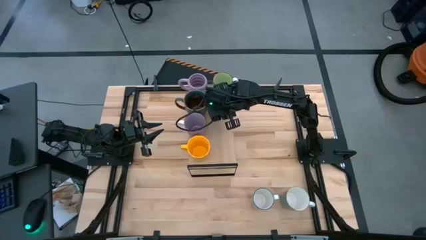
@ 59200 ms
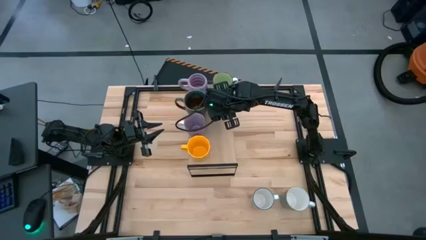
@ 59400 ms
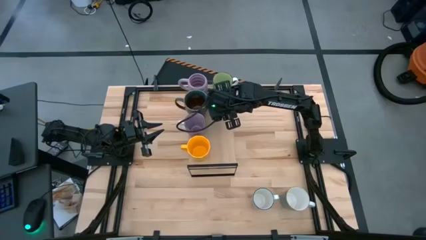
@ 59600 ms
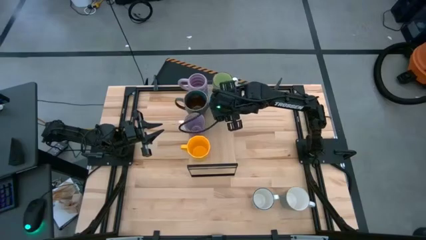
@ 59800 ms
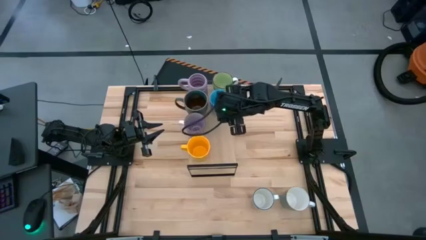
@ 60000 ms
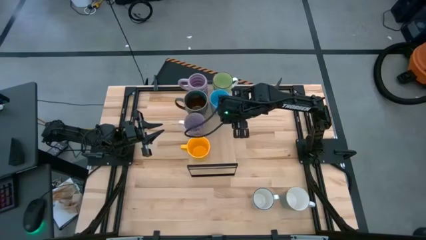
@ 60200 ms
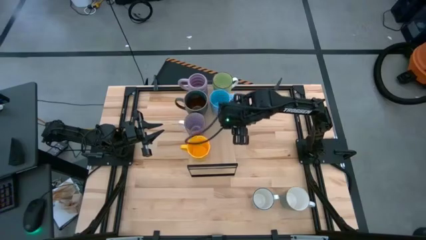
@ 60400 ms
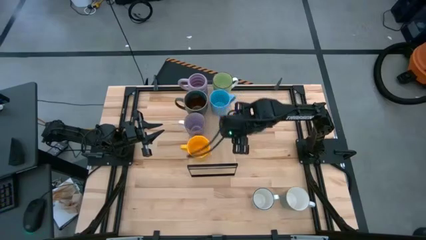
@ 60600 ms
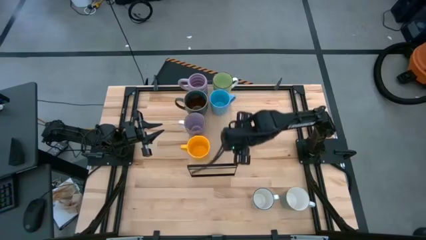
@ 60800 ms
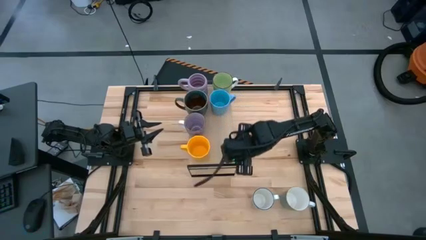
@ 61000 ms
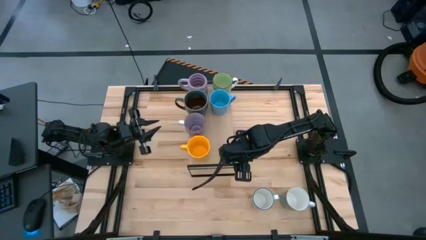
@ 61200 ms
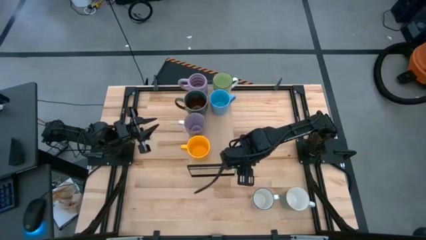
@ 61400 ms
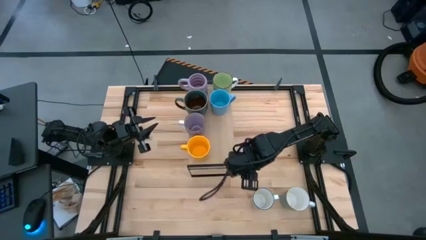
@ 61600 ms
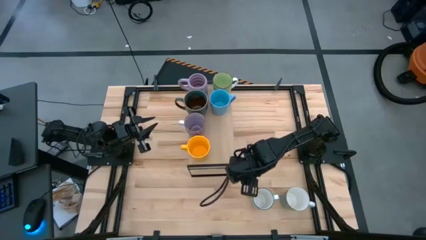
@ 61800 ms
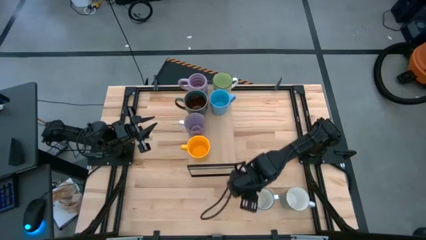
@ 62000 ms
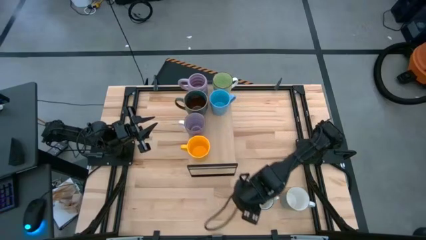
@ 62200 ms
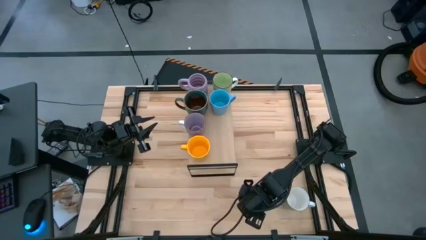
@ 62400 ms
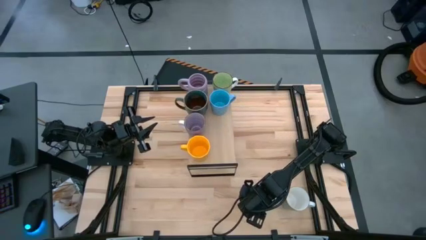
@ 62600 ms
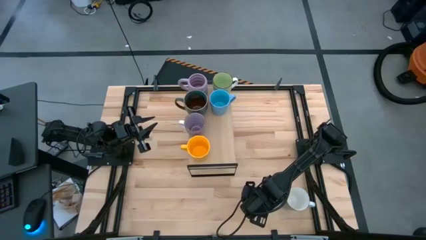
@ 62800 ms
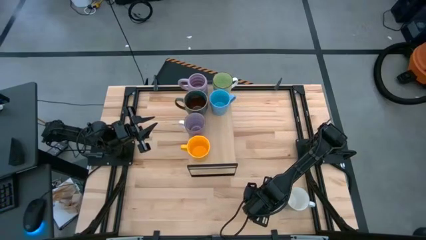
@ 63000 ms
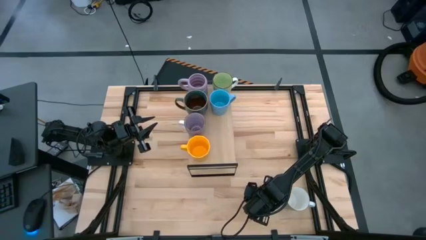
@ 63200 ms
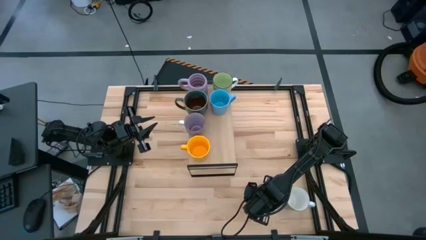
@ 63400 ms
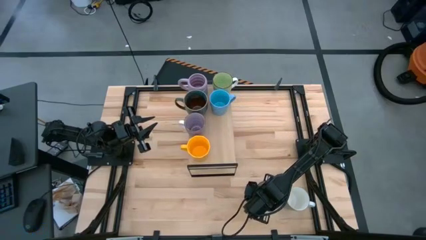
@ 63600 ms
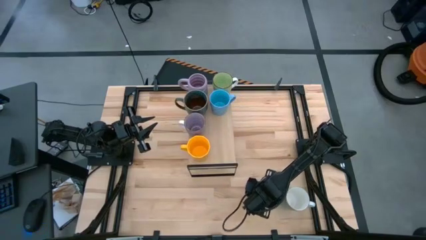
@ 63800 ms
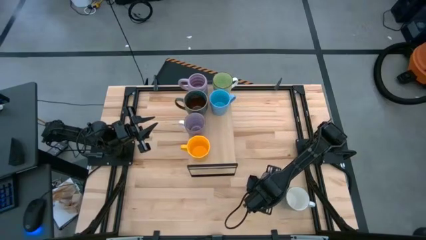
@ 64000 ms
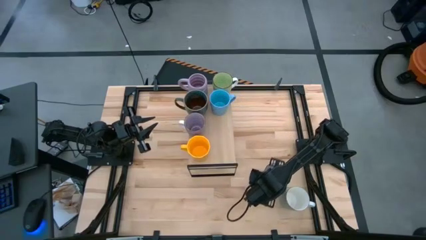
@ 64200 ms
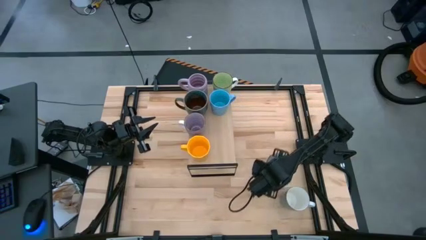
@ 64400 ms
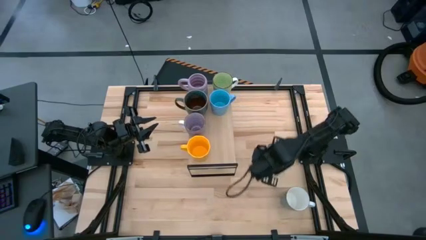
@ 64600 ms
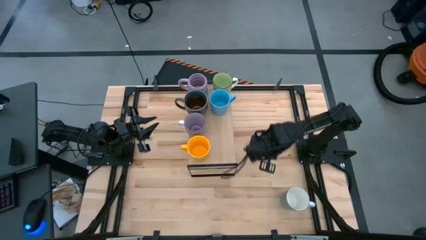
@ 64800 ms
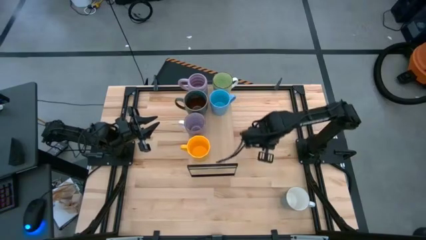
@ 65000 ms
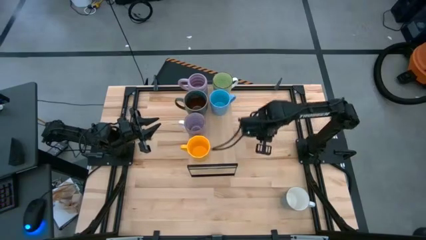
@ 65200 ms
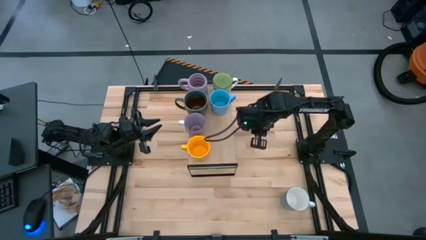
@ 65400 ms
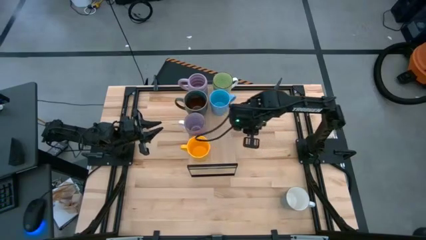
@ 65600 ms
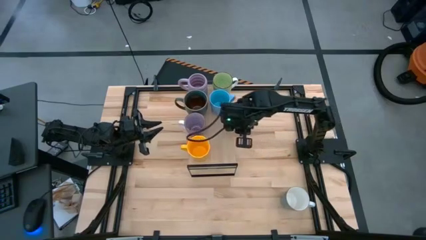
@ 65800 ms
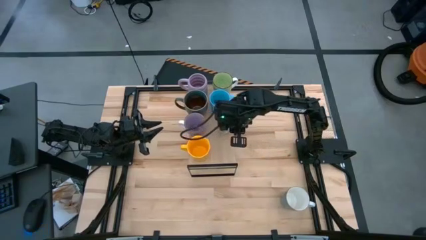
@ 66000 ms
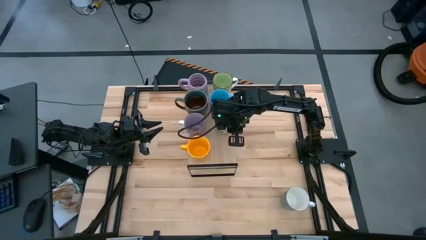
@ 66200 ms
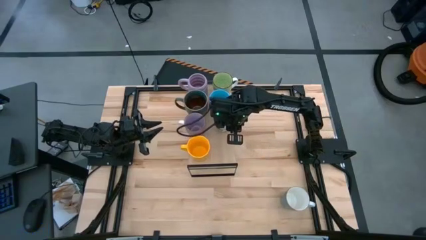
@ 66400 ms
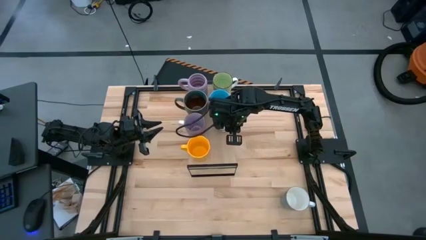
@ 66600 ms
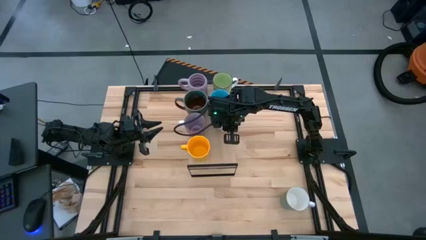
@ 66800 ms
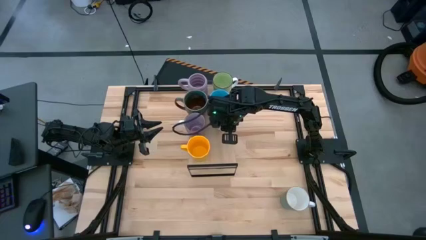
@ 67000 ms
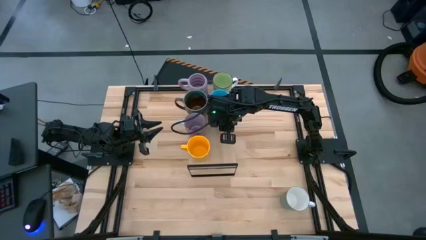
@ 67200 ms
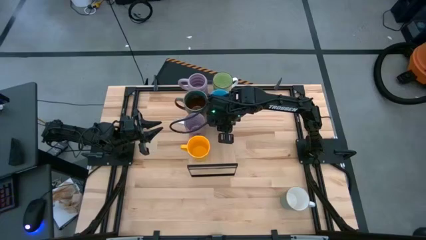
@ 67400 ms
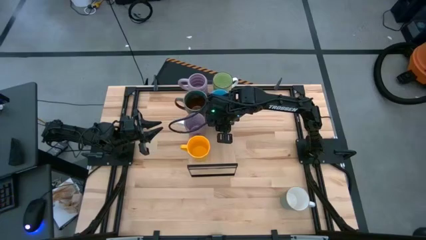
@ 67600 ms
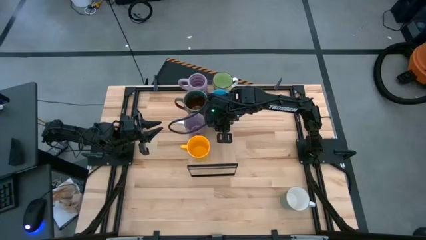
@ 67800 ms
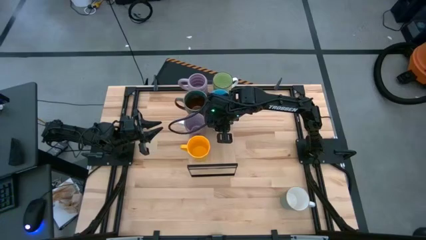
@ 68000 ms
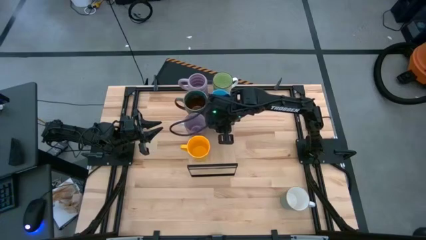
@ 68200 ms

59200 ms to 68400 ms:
Task: Place coffee mugs
Put the white patterned mug on the shelf

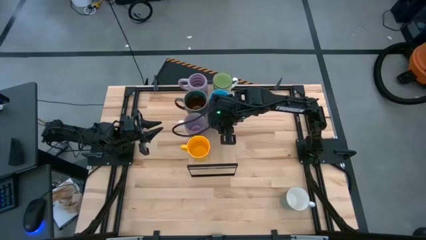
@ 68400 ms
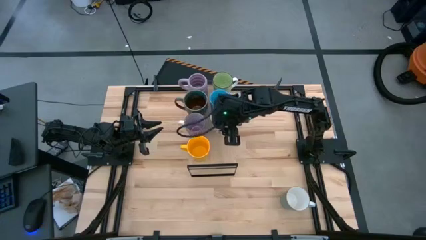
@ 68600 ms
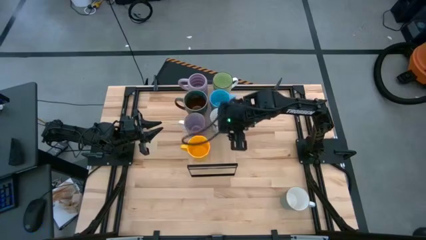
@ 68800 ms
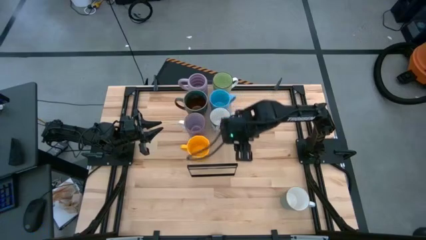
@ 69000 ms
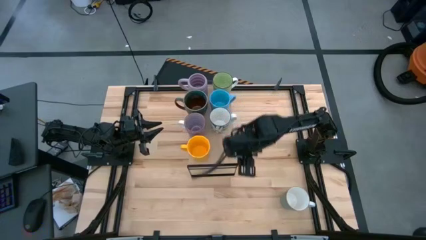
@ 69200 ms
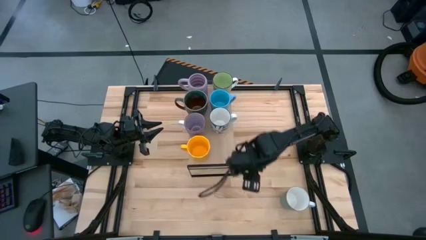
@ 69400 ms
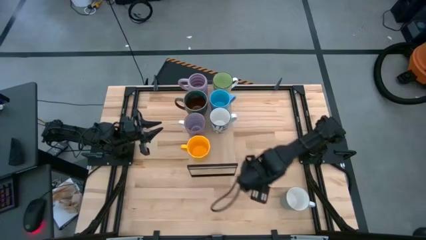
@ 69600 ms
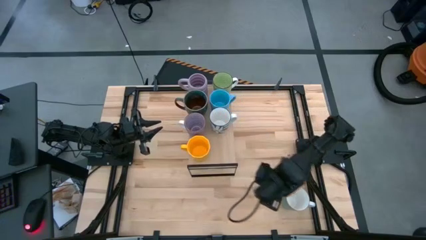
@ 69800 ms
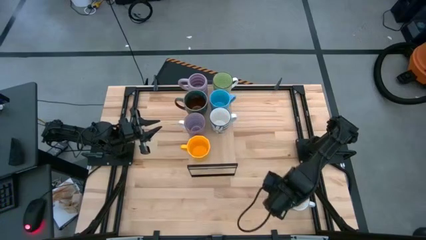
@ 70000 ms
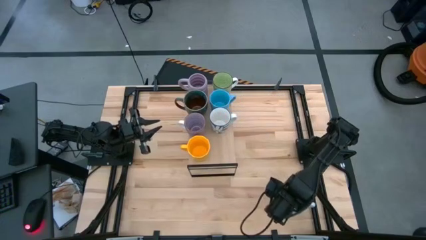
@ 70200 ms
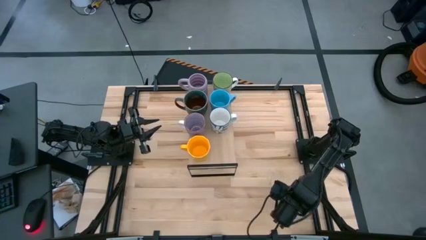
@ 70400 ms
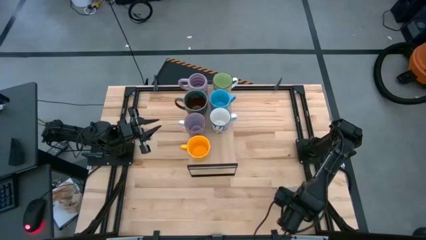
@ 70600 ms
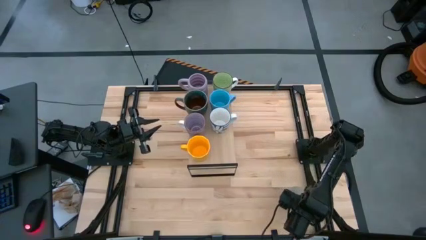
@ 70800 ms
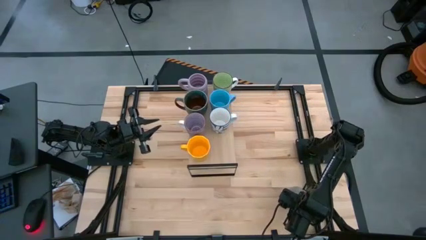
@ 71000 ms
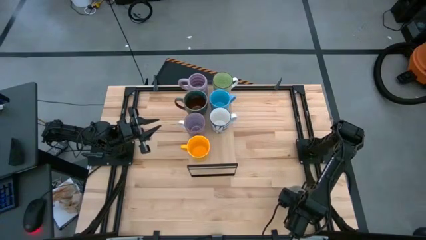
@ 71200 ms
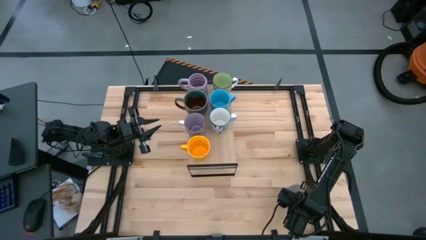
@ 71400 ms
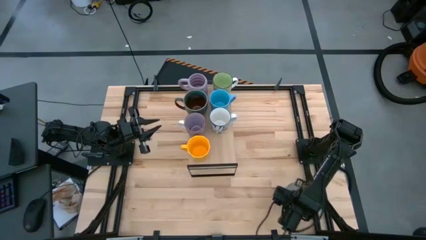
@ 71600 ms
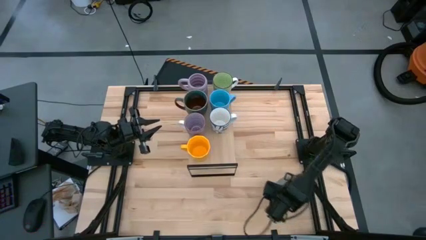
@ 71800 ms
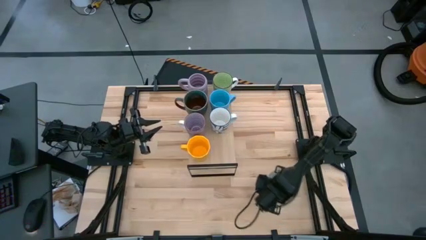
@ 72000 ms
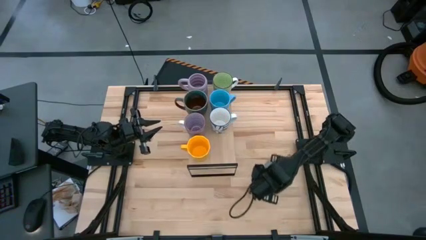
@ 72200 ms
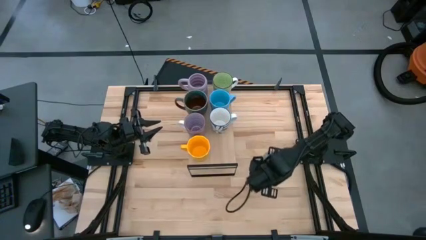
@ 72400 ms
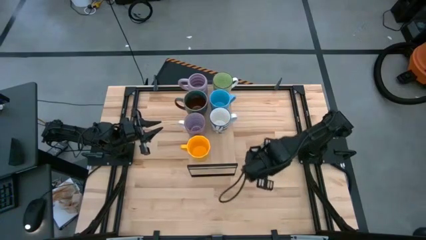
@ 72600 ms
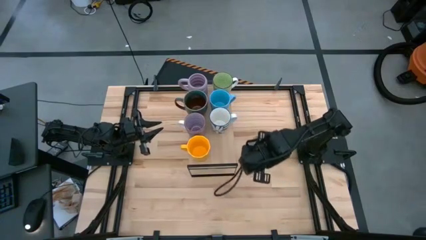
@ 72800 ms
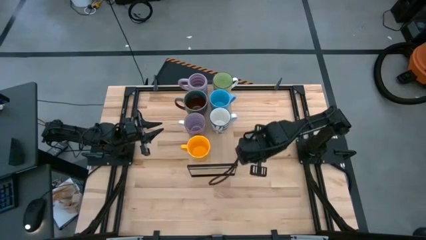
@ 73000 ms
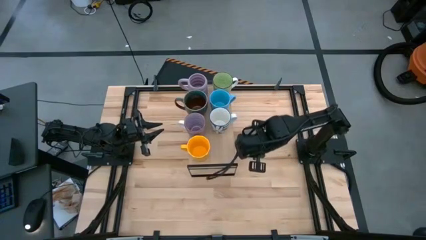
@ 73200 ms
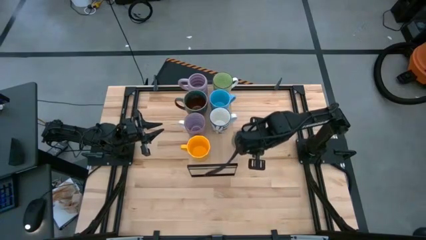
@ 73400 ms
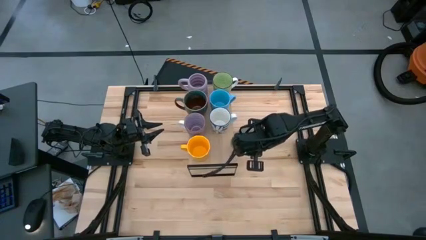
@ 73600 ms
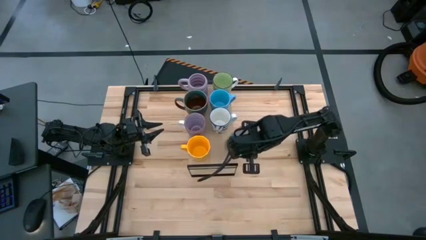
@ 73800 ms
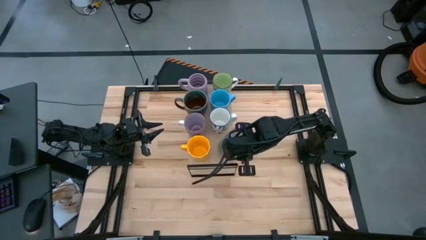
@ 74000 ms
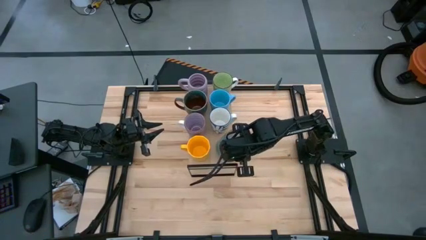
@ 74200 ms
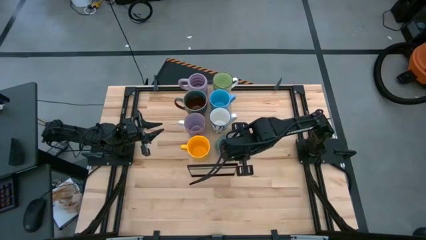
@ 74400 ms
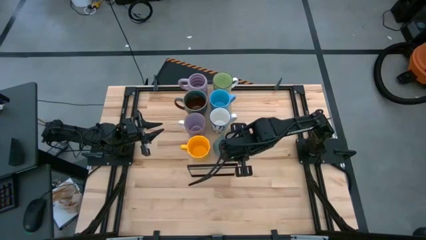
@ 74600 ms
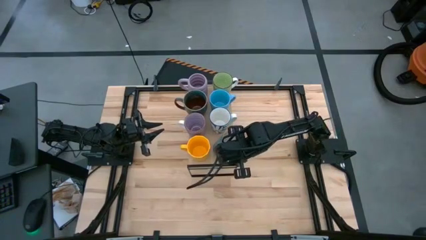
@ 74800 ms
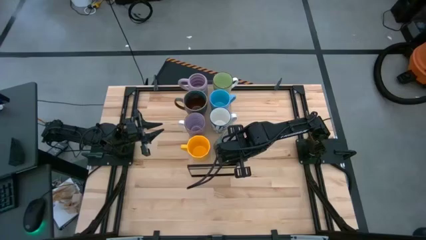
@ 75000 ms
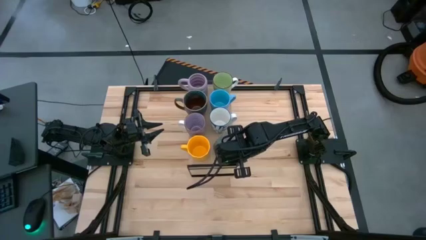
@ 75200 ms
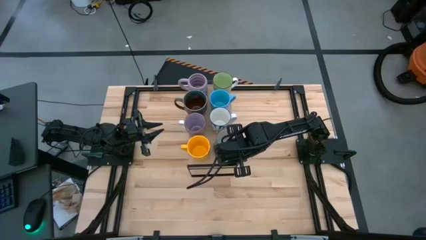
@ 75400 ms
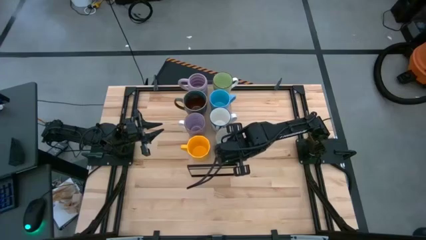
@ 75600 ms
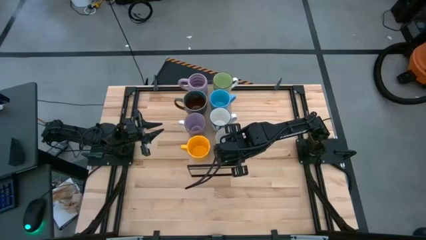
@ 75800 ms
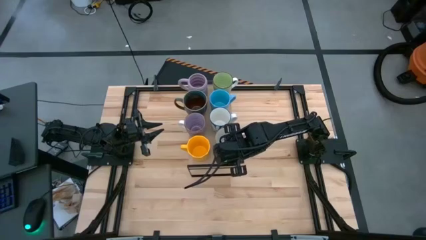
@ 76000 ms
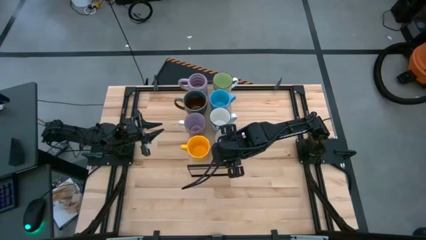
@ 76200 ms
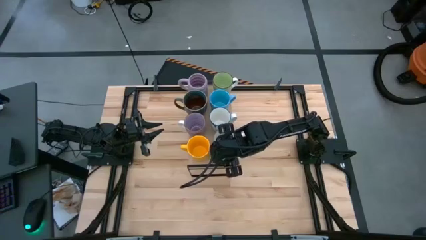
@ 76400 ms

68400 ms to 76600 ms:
Put the teal blue mug on the shelf
